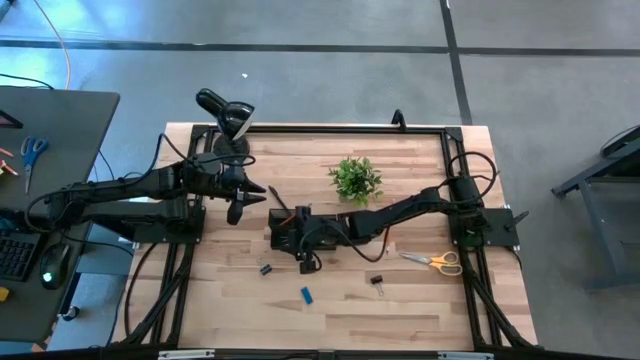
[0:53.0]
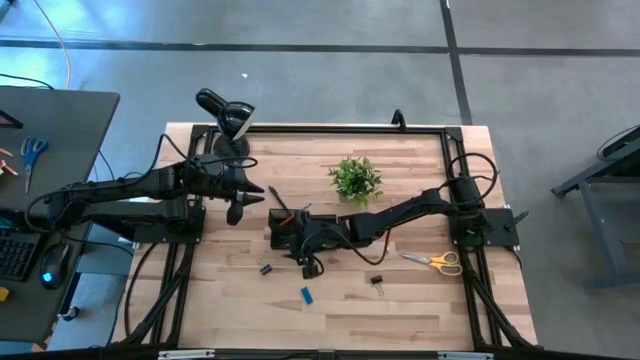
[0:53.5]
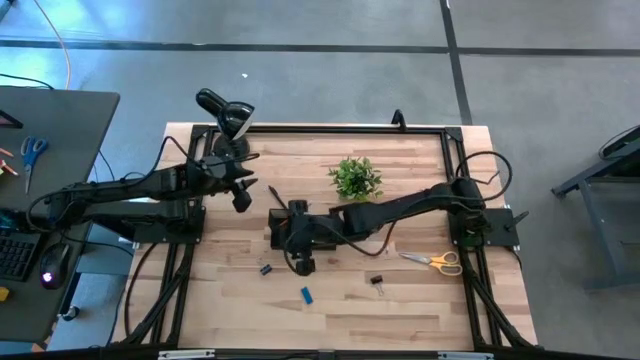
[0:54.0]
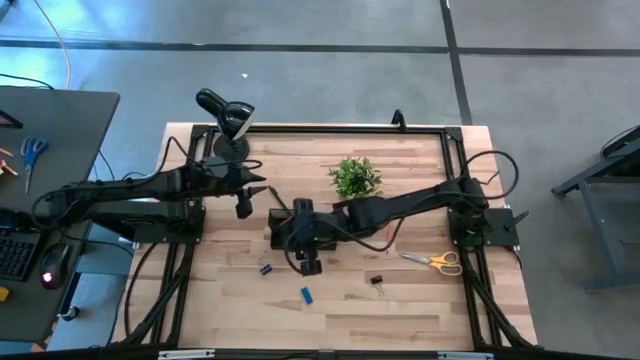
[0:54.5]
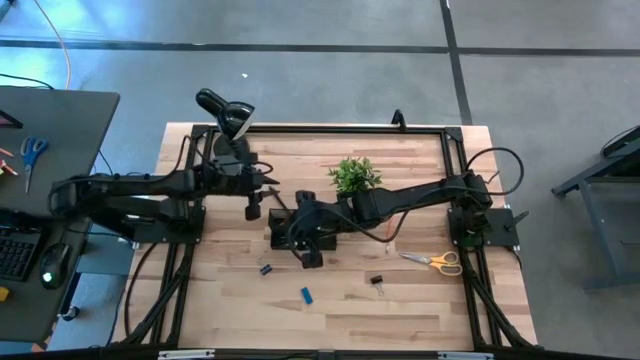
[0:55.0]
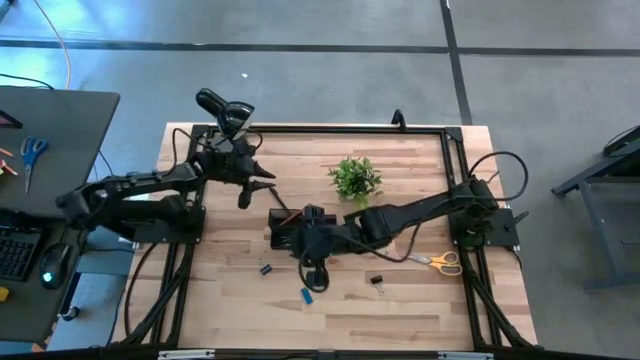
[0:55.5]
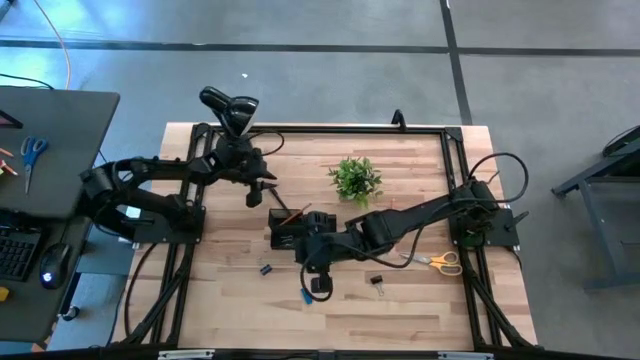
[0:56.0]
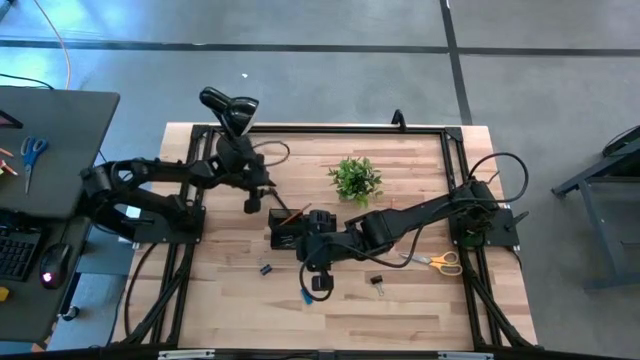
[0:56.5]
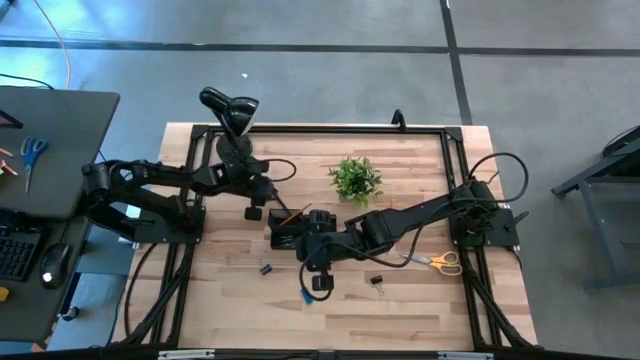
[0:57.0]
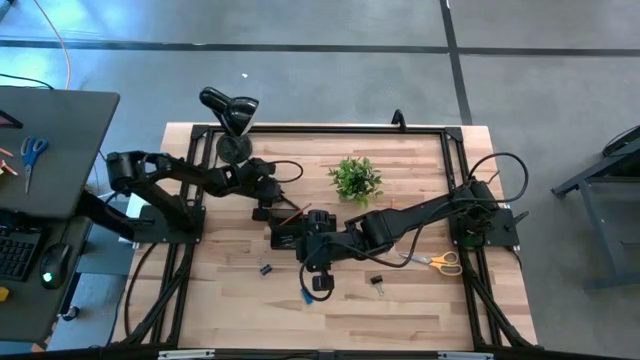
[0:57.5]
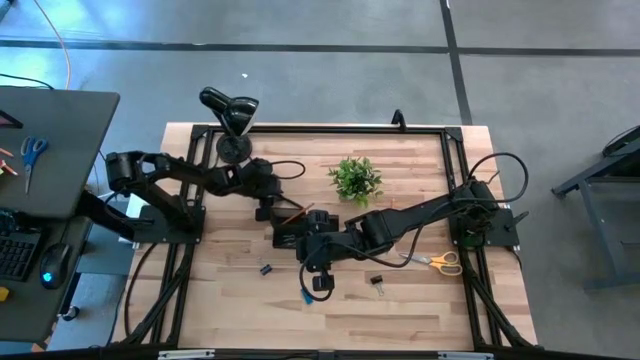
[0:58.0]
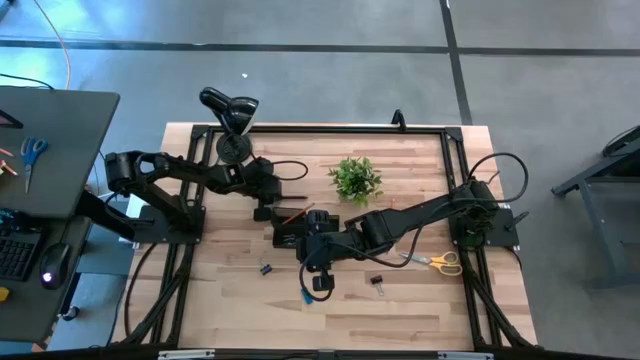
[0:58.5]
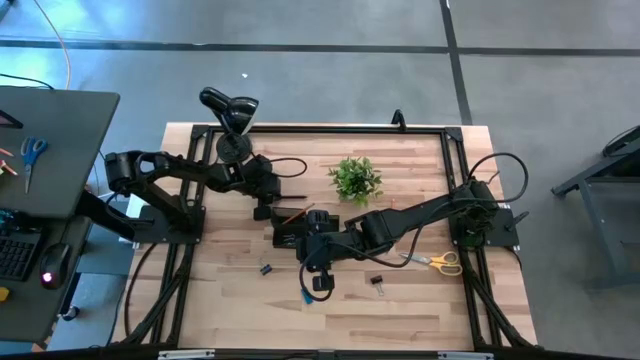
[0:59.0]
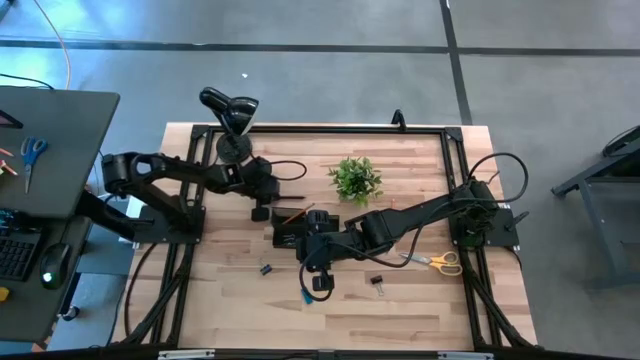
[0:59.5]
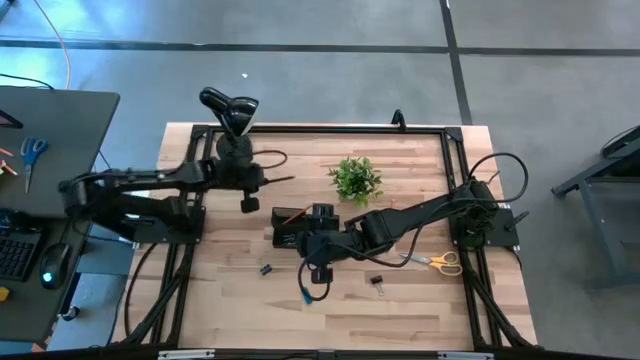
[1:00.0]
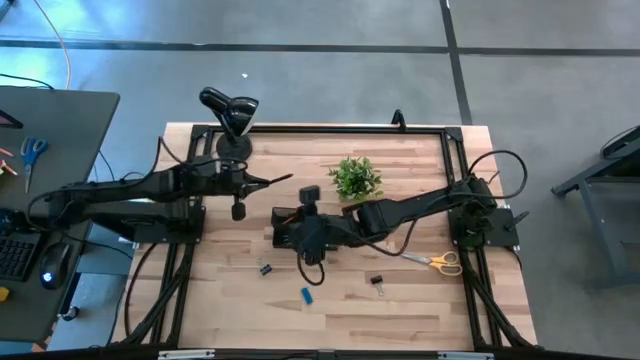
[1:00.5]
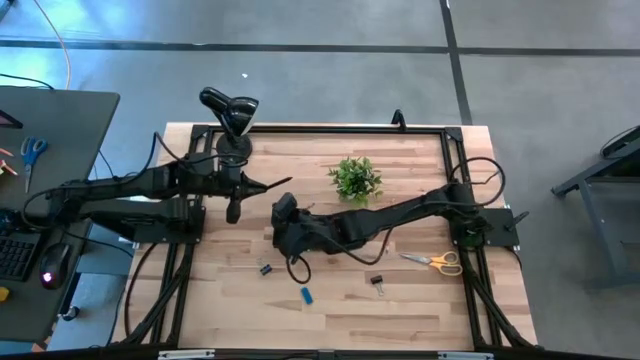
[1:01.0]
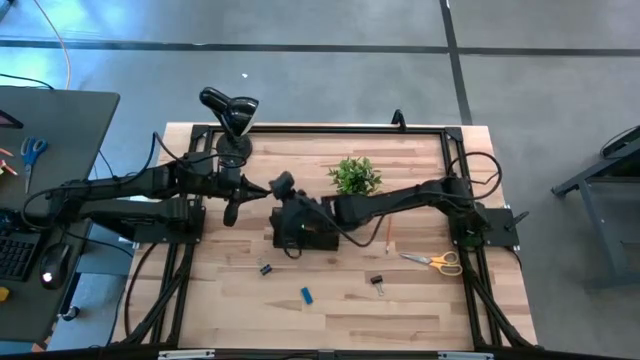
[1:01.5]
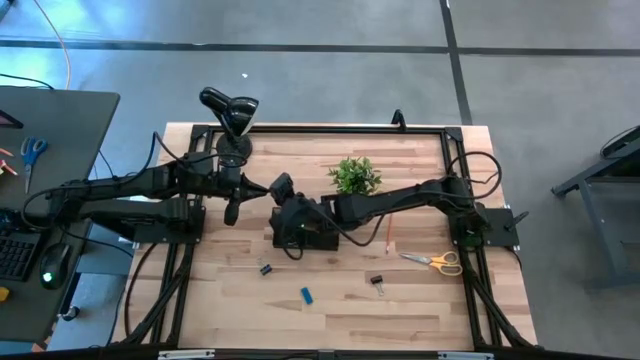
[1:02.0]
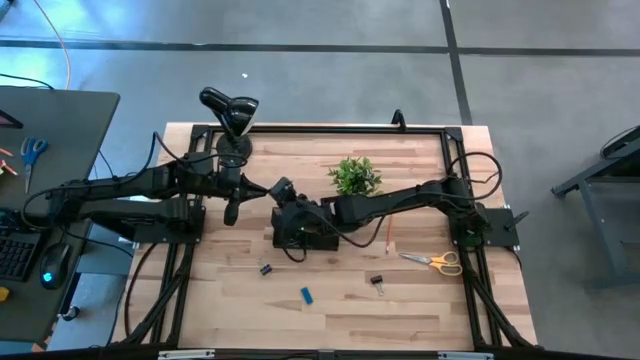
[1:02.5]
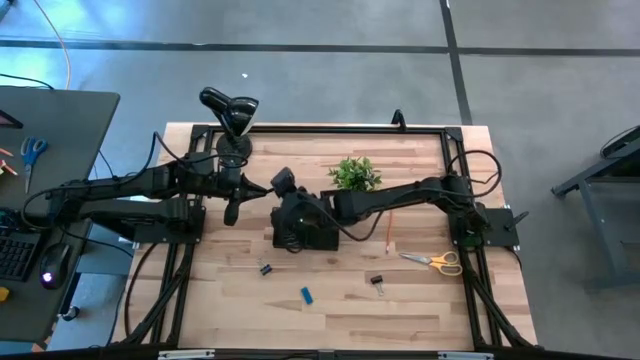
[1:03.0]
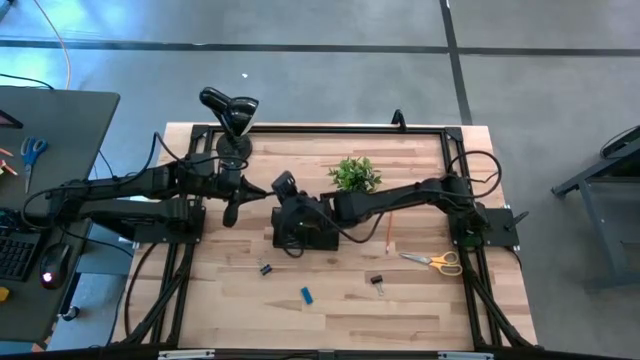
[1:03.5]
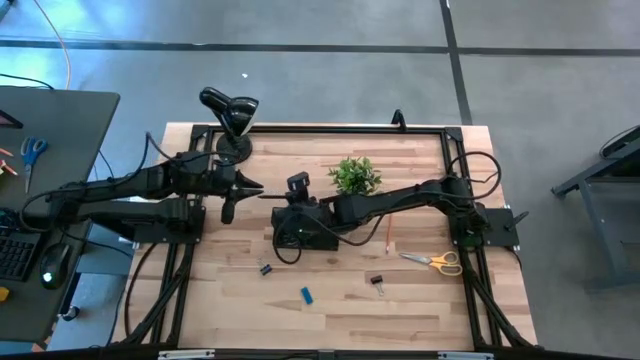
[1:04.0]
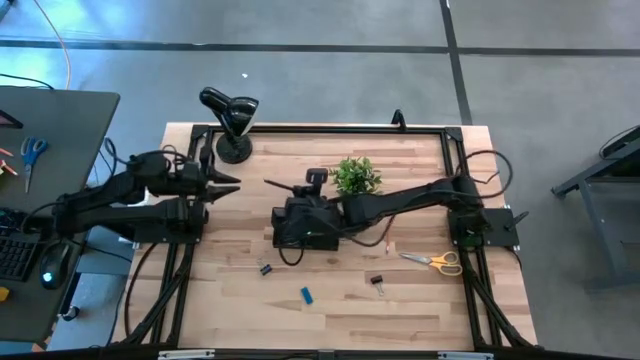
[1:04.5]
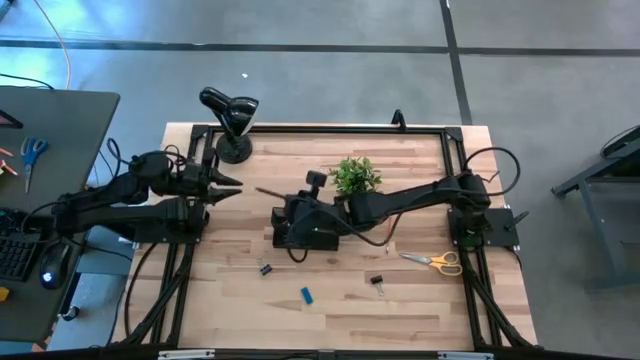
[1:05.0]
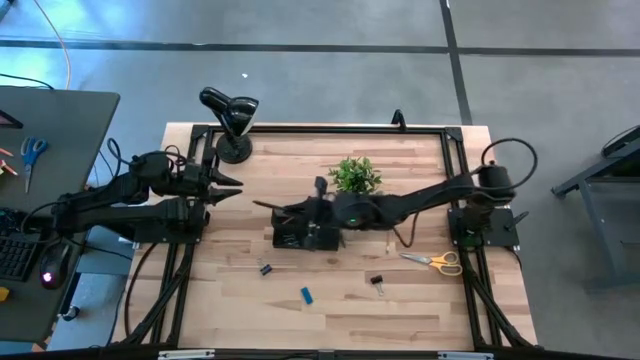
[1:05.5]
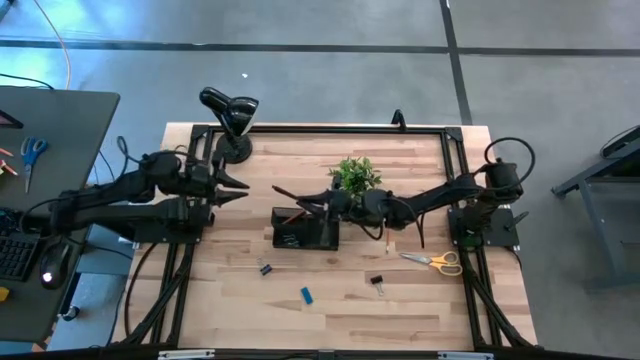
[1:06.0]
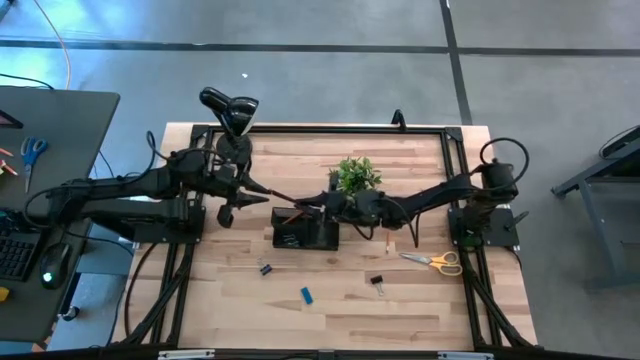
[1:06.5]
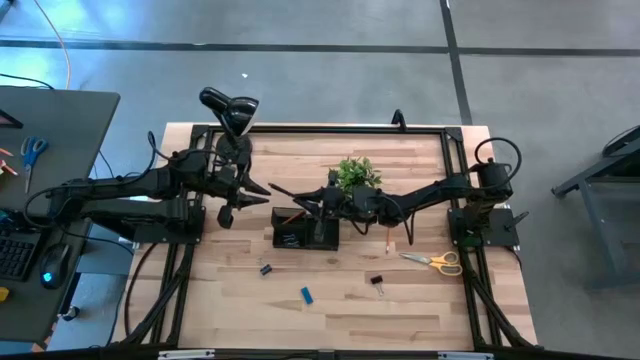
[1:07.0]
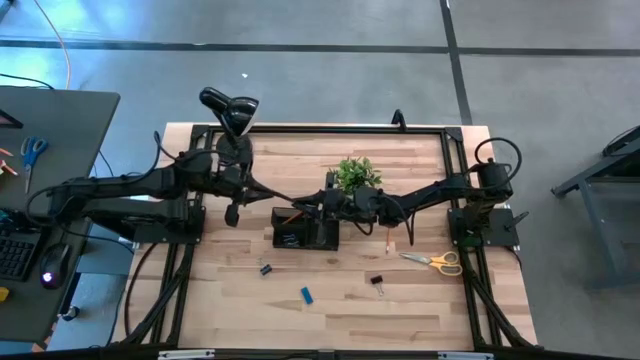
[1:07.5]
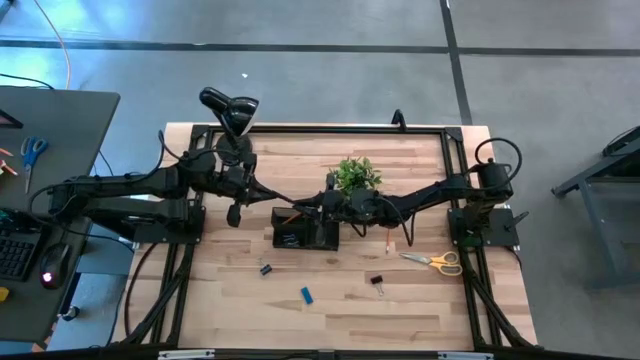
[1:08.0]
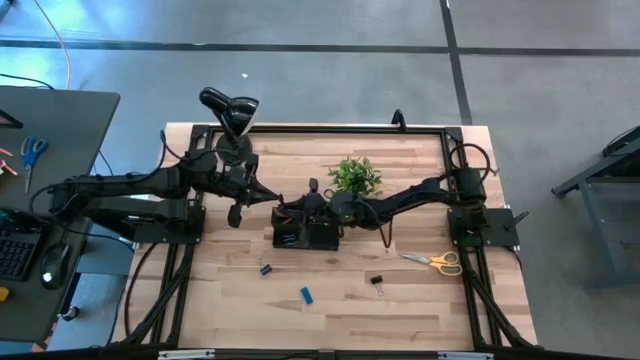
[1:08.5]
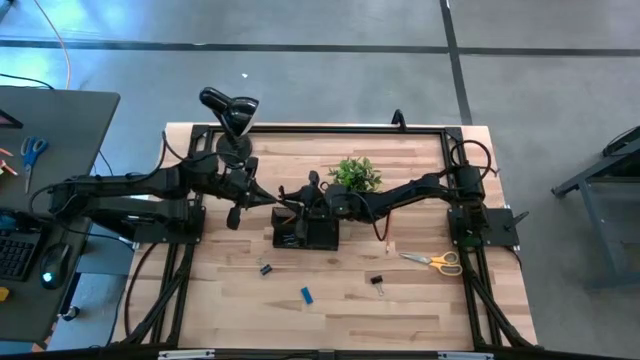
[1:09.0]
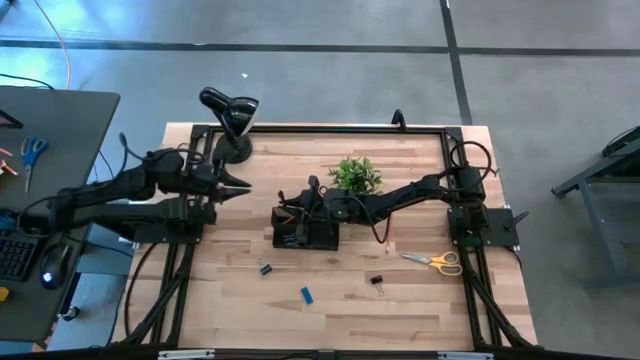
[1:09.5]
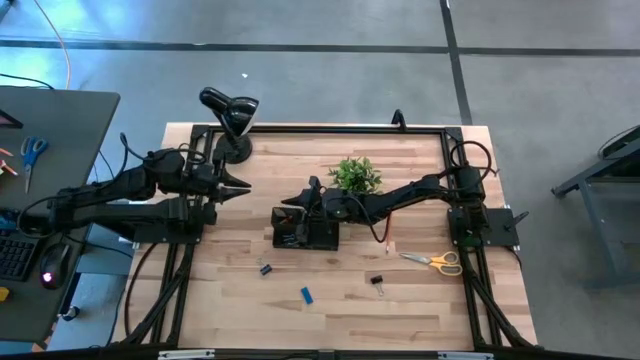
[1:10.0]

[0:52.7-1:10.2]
Task: Pick and place office supplies into organizer
Put the black pen into the black desk organizer

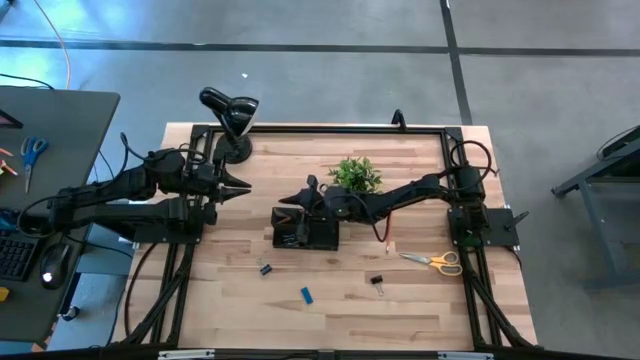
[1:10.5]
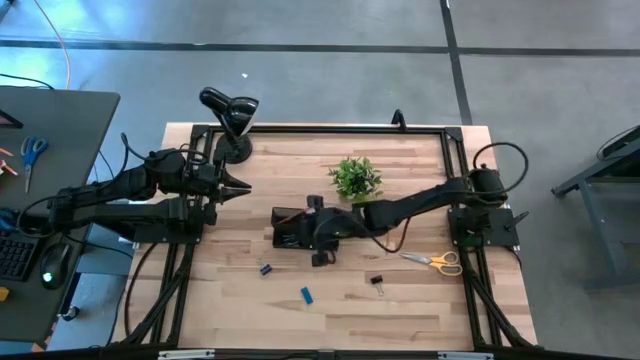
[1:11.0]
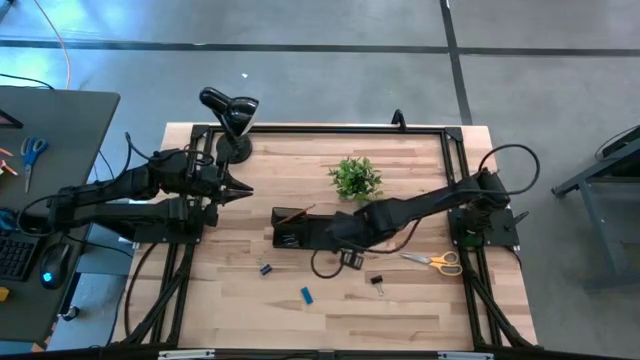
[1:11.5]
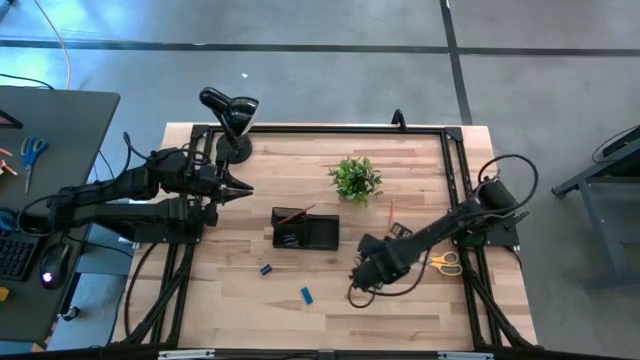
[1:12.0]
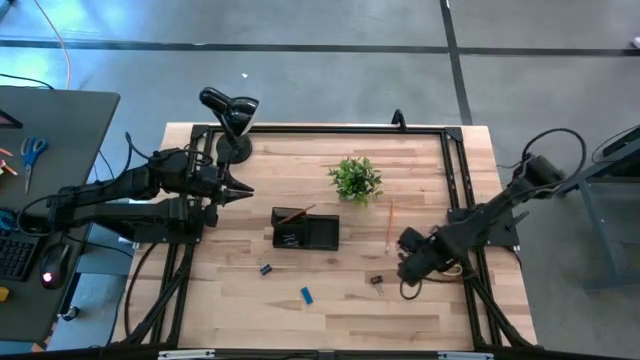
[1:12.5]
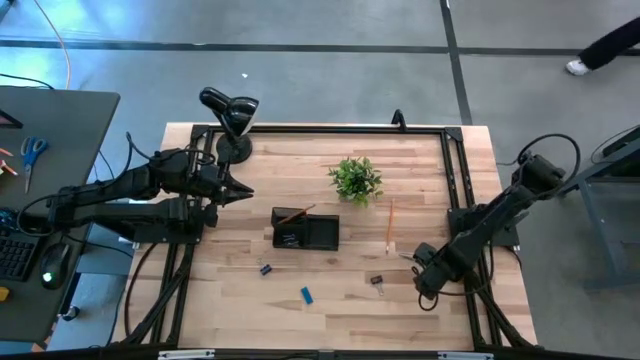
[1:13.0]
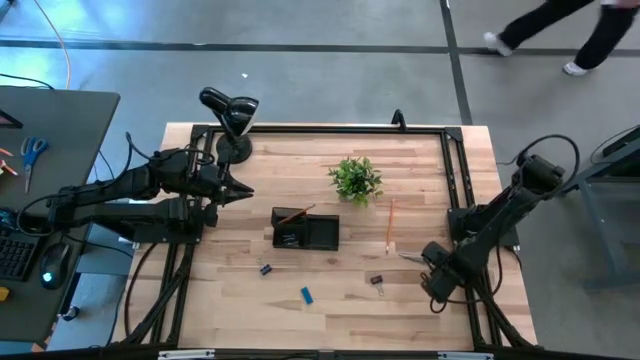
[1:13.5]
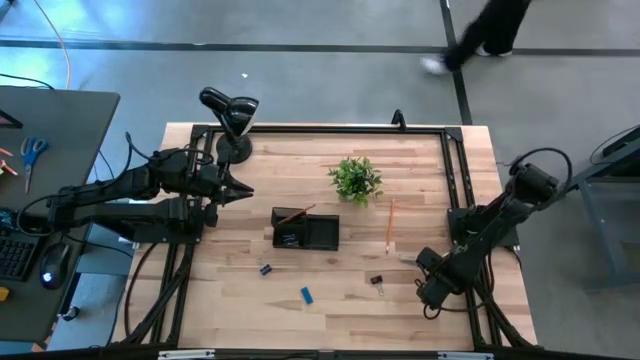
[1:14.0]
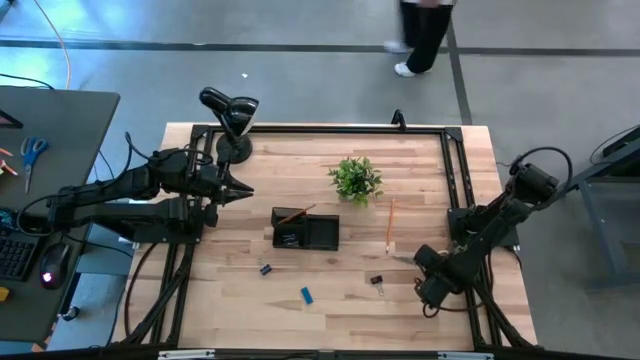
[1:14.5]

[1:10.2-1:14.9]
Put the yellow scissors into the black desk organizer
